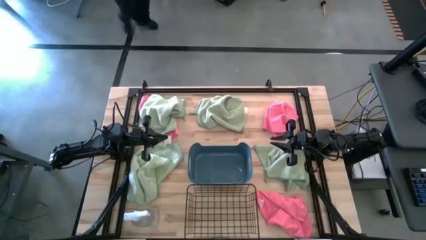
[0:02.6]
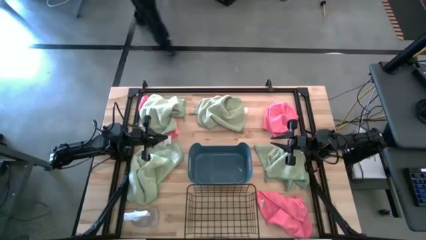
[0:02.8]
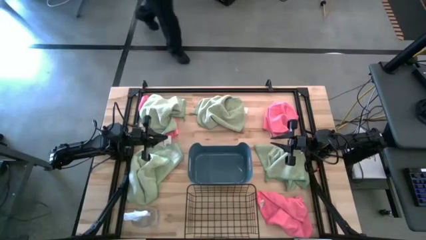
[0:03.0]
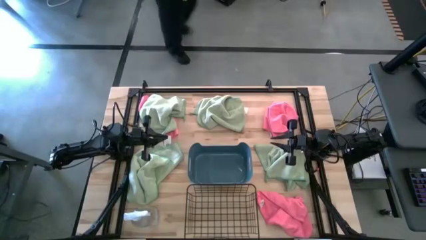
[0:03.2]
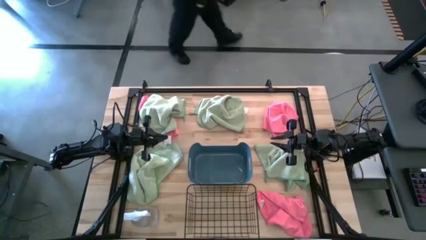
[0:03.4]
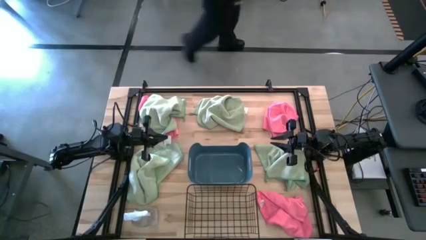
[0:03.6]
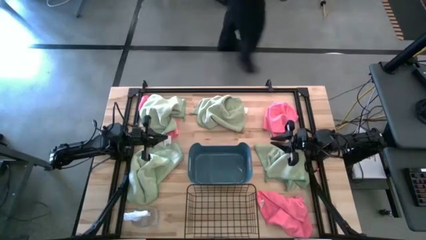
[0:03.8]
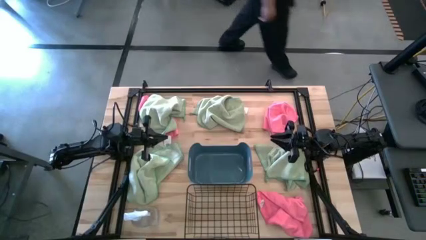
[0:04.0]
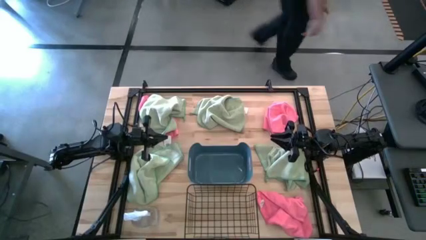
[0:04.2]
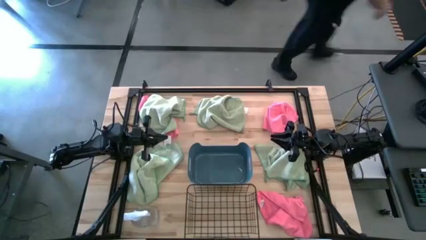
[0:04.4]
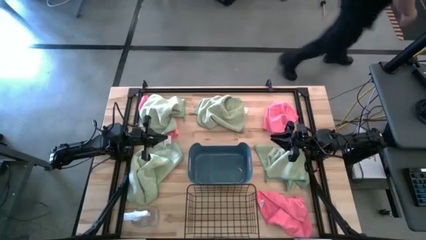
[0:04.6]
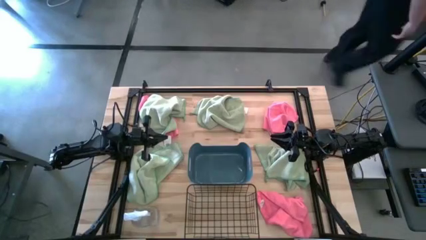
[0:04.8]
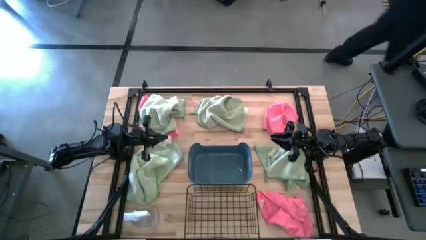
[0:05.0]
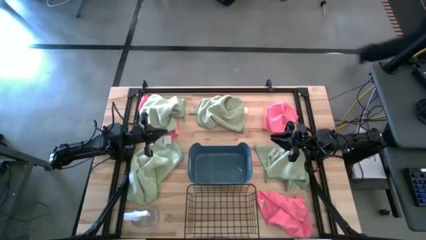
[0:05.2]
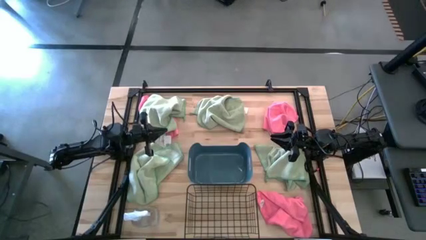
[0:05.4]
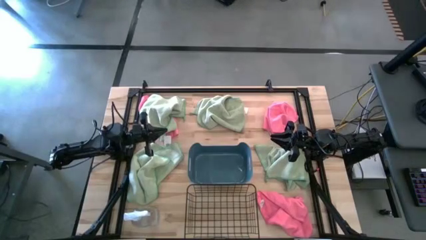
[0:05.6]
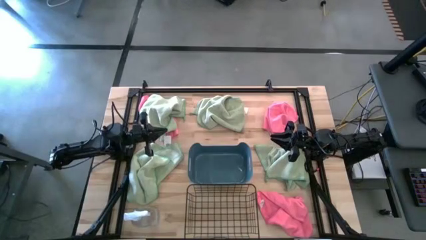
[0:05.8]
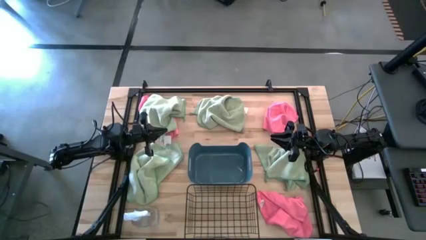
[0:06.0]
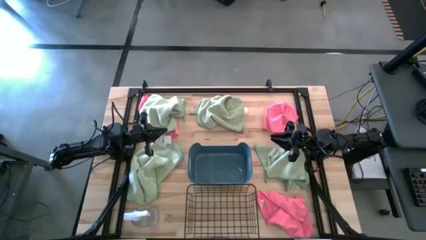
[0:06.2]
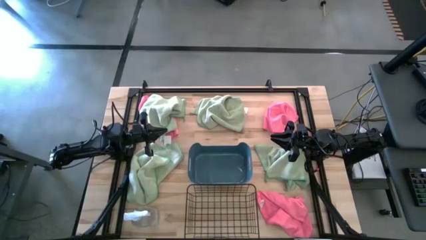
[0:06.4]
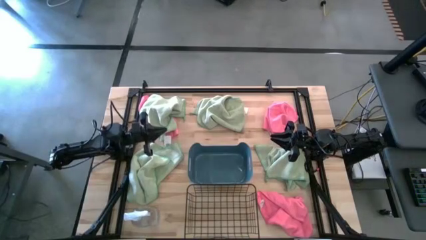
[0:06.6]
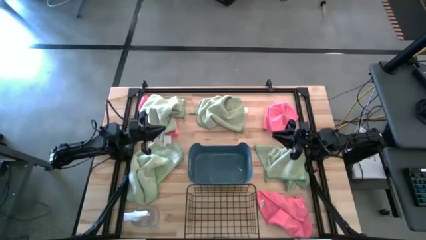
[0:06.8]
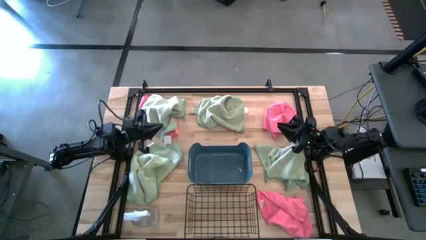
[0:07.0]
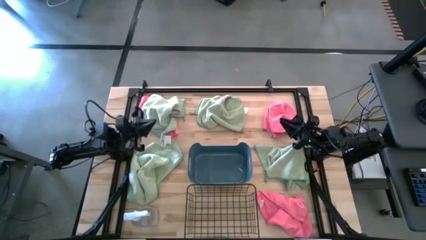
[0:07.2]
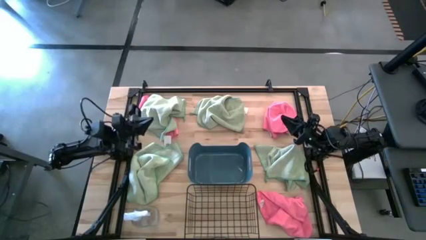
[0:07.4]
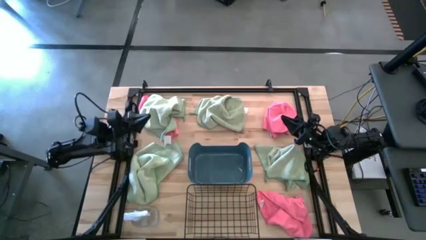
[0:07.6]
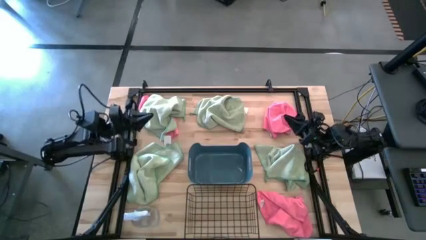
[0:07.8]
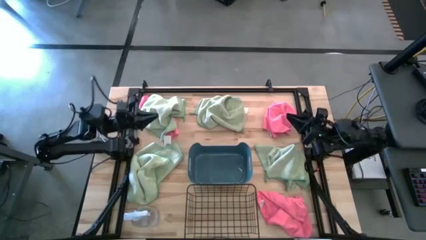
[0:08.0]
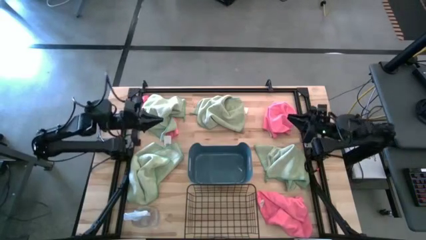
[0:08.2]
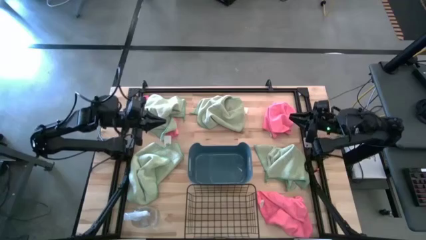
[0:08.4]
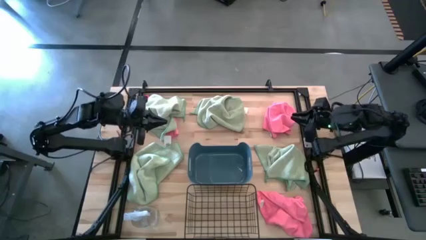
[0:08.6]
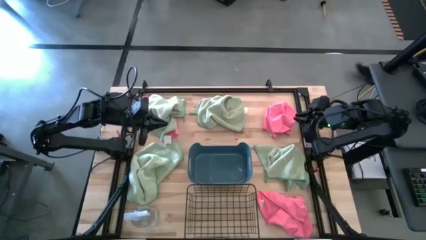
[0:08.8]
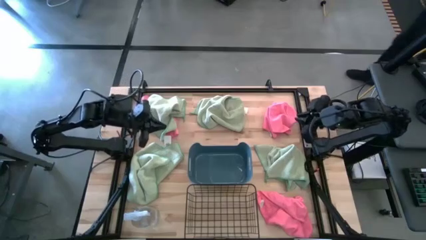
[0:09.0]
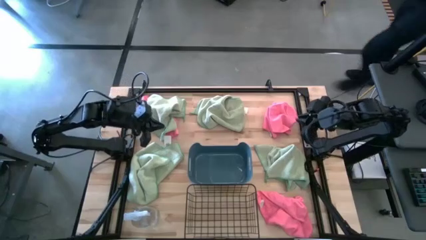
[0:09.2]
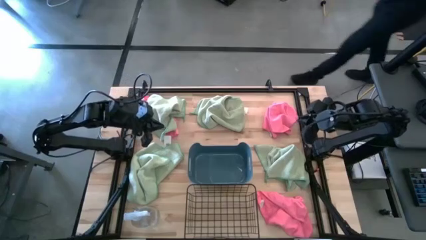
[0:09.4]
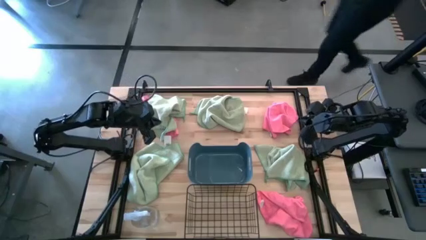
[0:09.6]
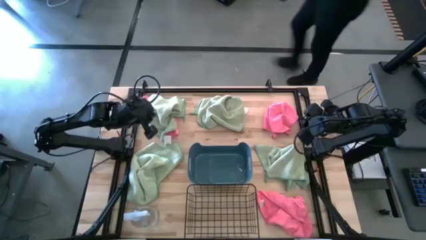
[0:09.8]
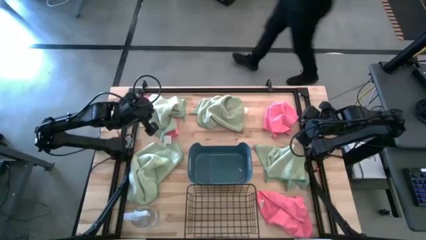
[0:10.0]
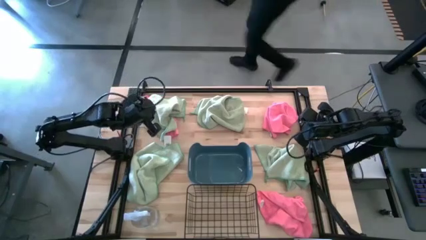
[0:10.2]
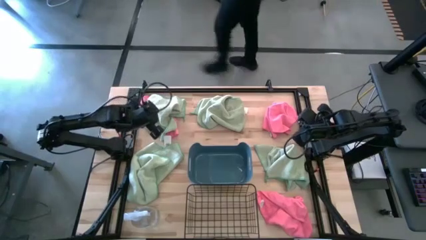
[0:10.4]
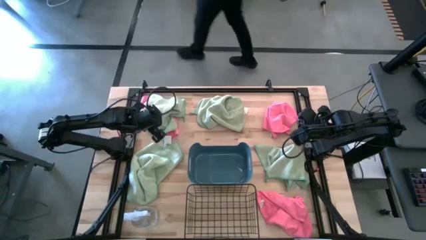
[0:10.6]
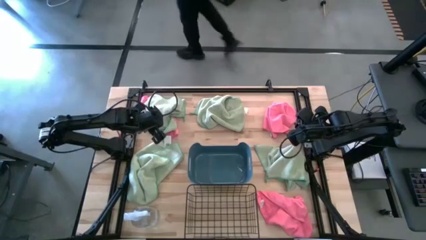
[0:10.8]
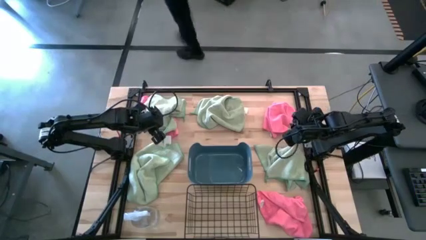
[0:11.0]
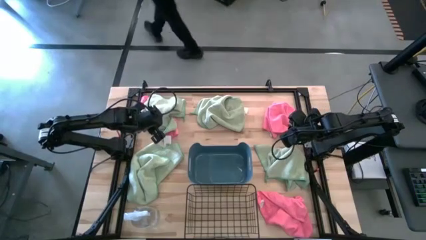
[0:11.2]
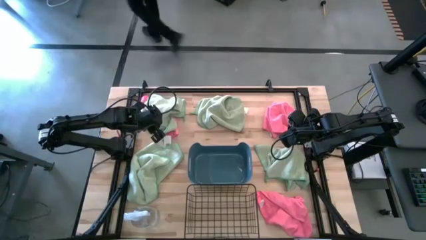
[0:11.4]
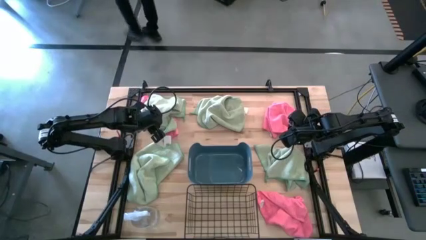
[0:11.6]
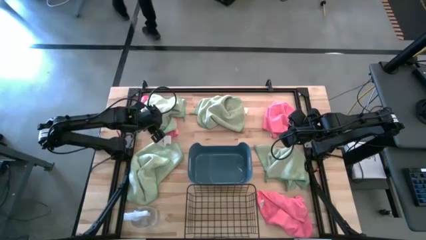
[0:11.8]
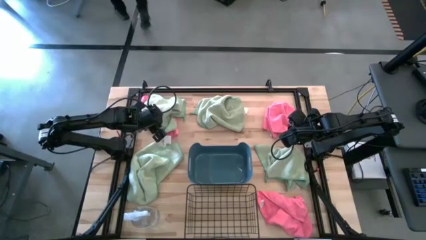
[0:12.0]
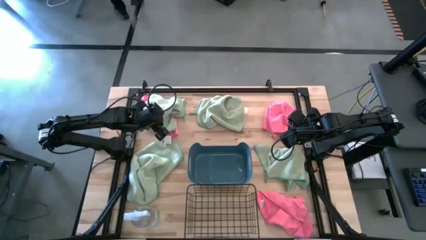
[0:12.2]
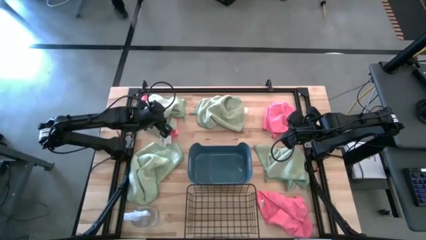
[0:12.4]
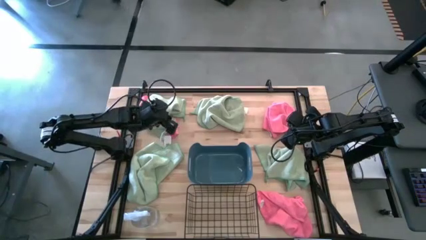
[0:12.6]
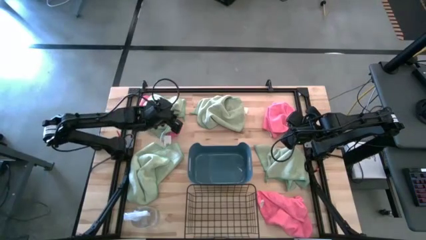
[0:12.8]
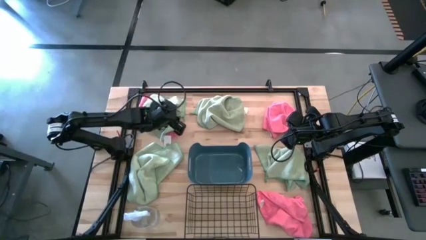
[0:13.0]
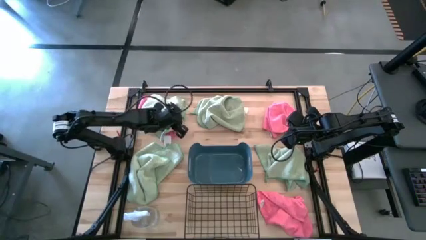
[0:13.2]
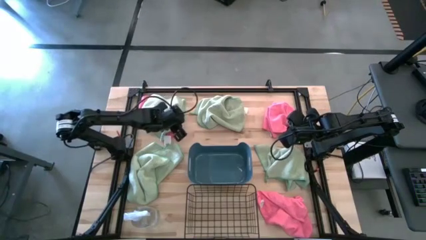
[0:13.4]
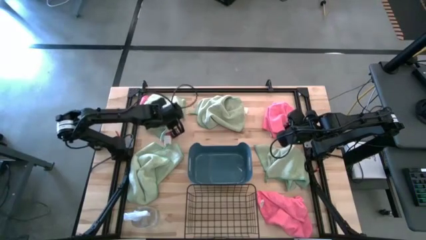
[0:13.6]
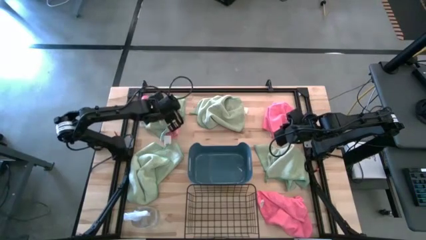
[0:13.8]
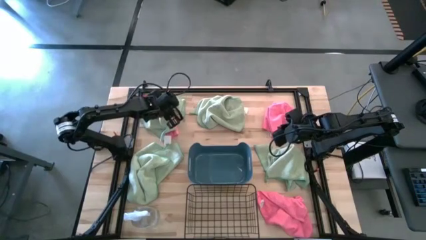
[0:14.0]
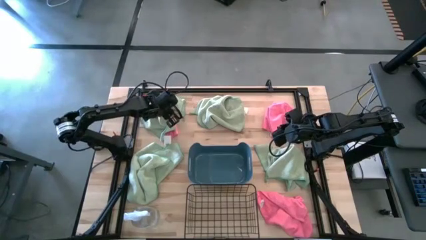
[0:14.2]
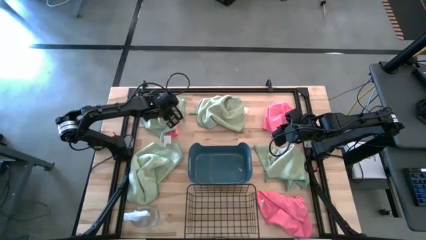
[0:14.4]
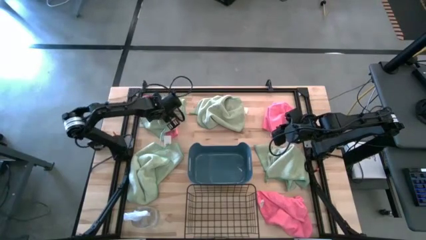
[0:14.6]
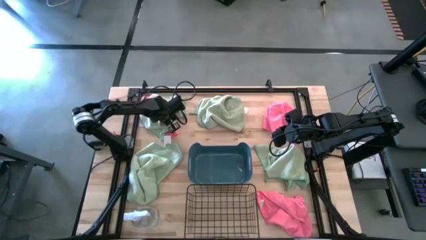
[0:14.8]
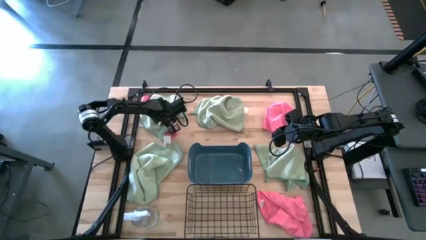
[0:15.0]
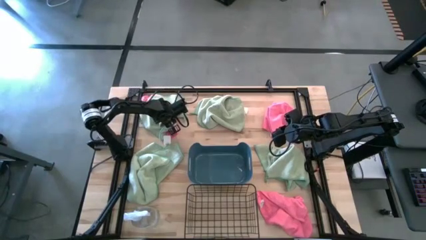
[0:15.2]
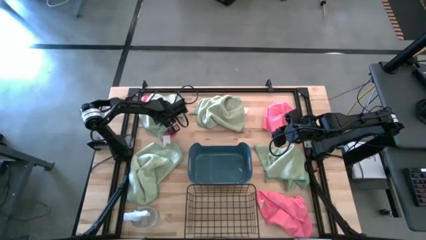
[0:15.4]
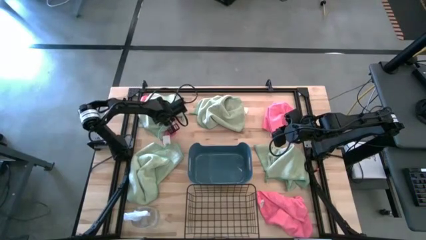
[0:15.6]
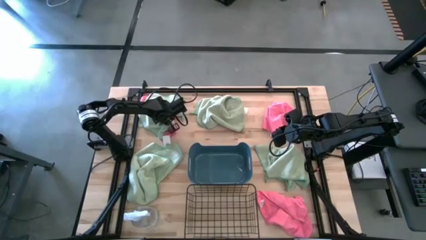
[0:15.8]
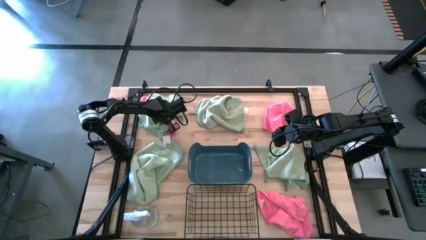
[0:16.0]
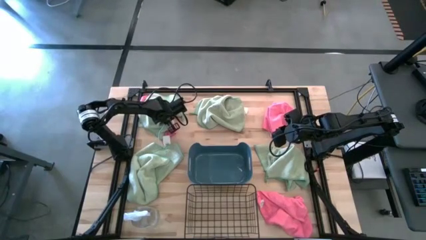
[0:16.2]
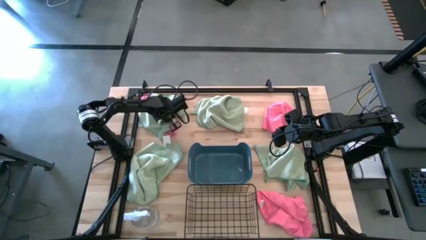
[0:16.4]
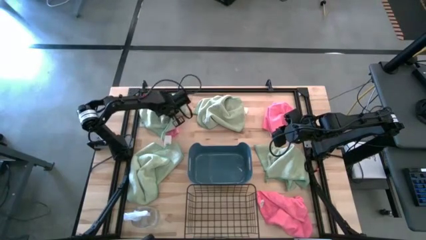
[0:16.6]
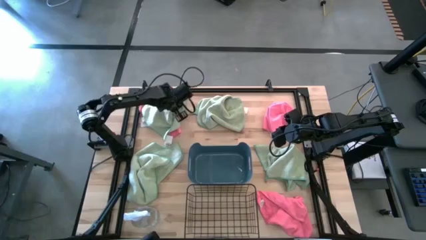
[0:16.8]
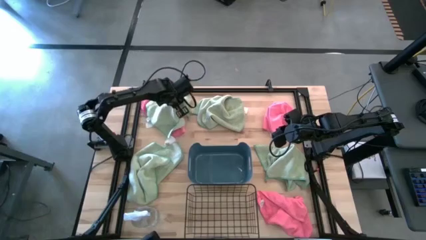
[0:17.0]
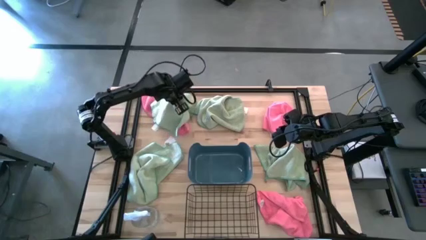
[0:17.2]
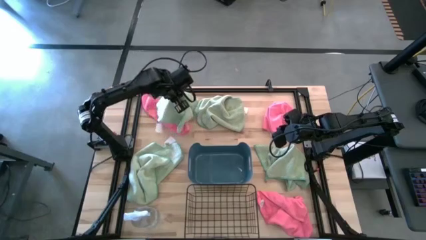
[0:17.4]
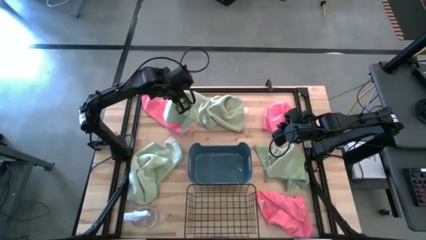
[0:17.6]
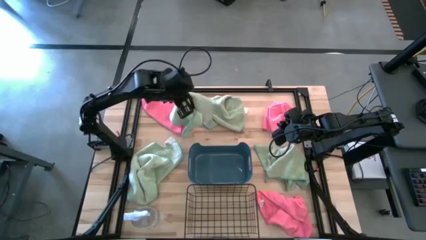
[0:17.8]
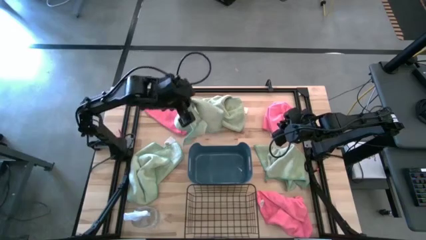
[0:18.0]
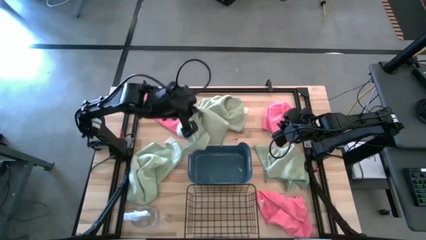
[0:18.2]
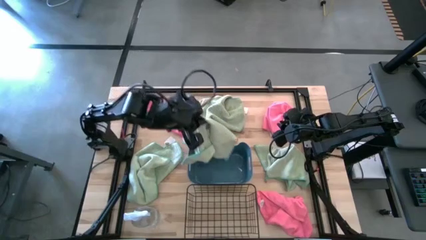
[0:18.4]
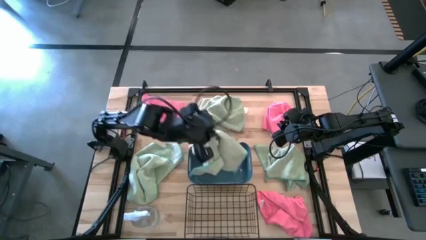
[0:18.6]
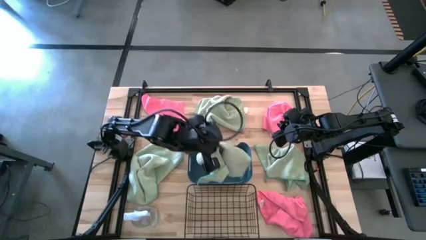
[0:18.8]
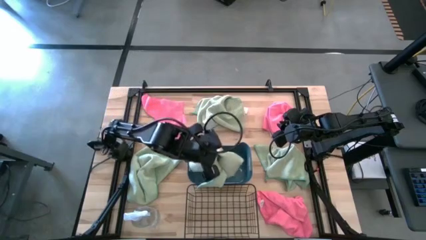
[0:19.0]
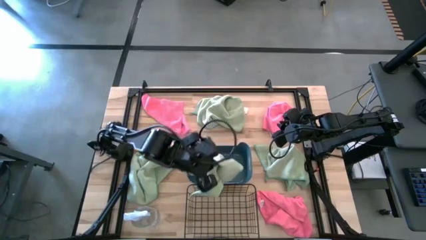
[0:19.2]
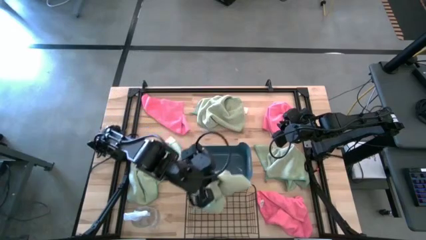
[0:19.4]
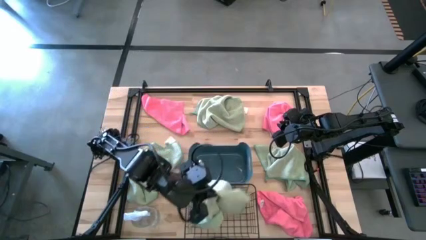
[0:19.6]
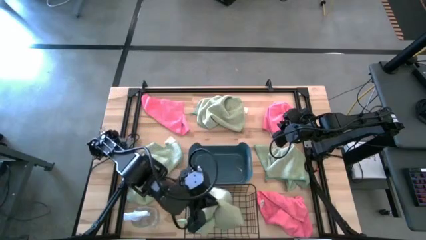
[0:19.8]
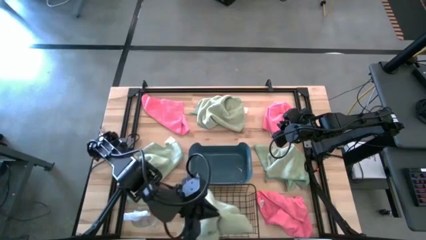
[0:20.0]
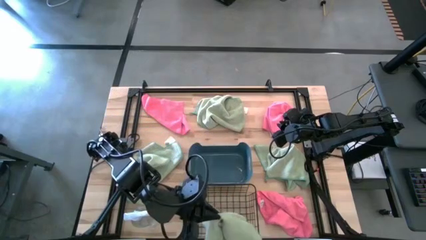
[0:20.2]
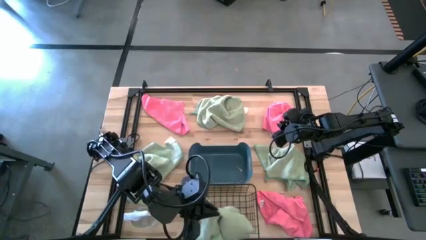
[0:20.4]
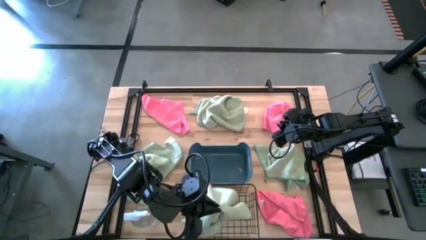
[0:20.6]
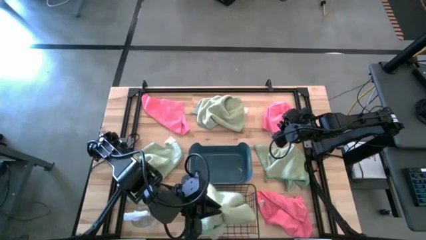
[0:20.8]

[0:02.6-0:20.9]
Task: Sort microfiber towel by color & place in baskets
Put the top left green microfiber towel into the mesh storage bin
